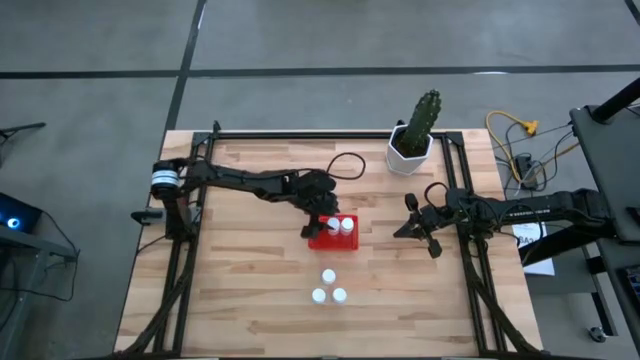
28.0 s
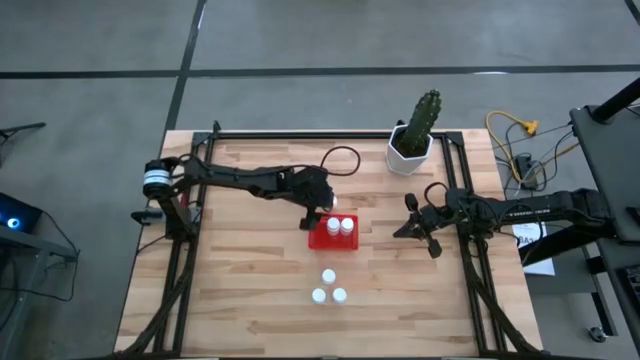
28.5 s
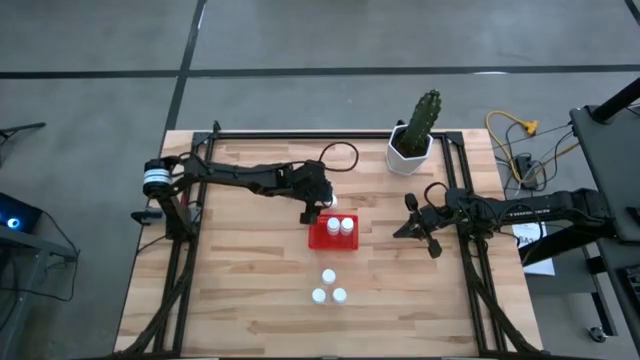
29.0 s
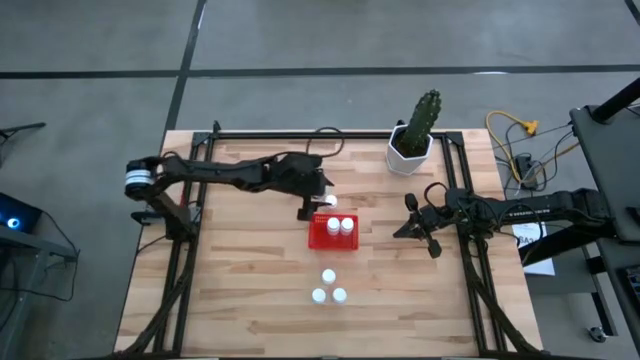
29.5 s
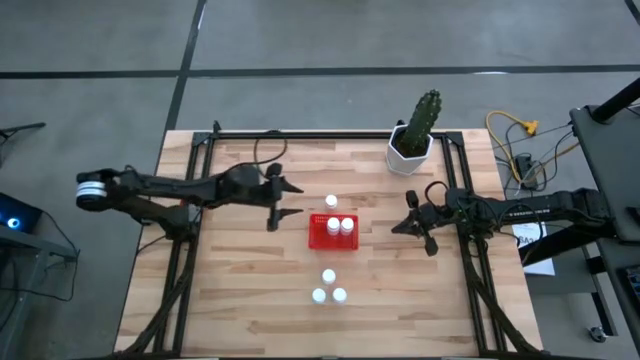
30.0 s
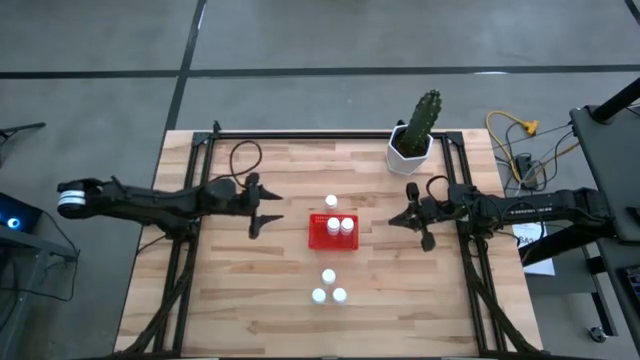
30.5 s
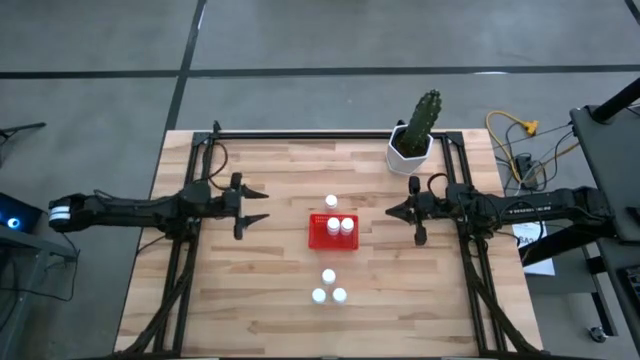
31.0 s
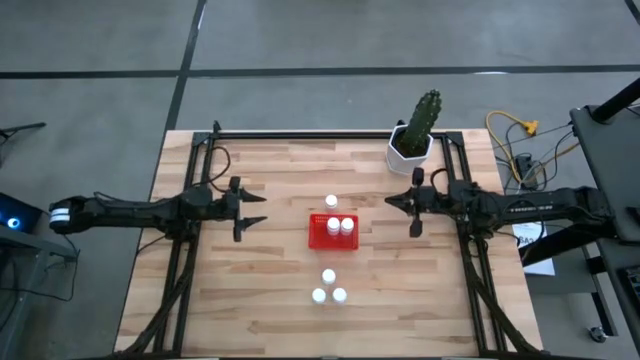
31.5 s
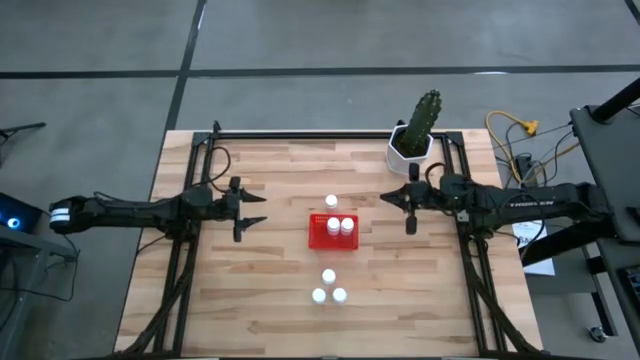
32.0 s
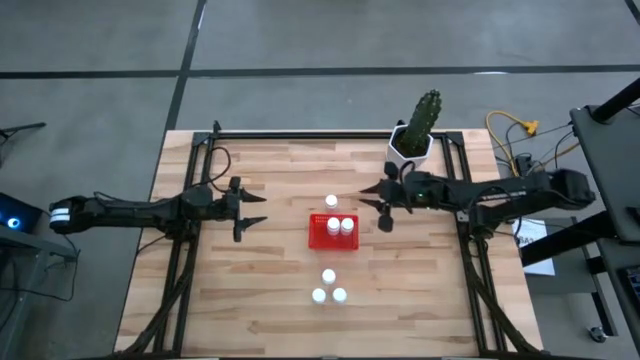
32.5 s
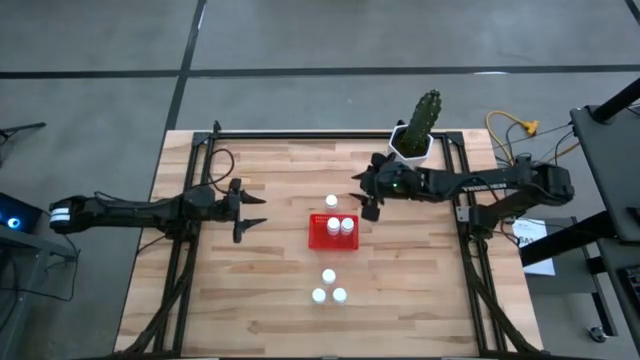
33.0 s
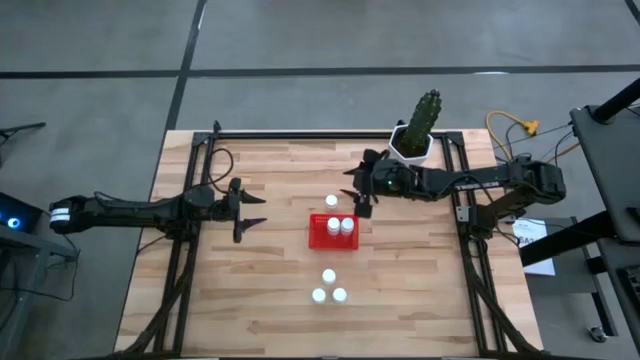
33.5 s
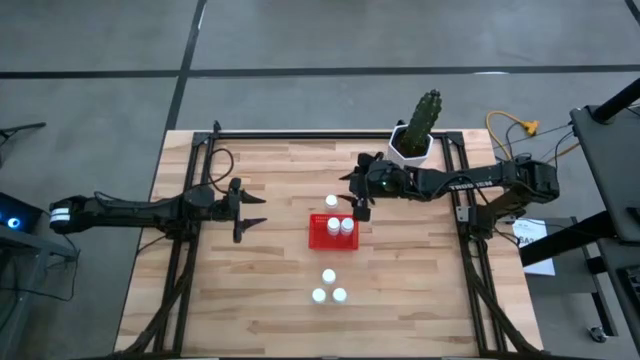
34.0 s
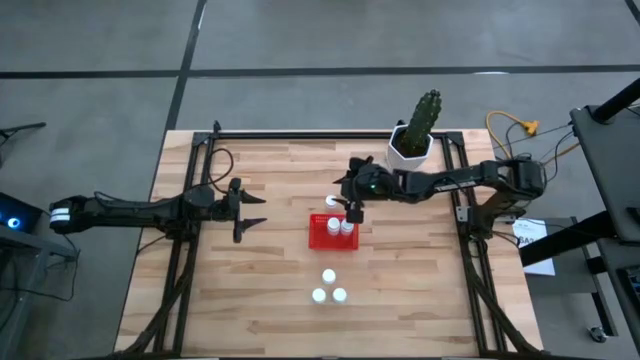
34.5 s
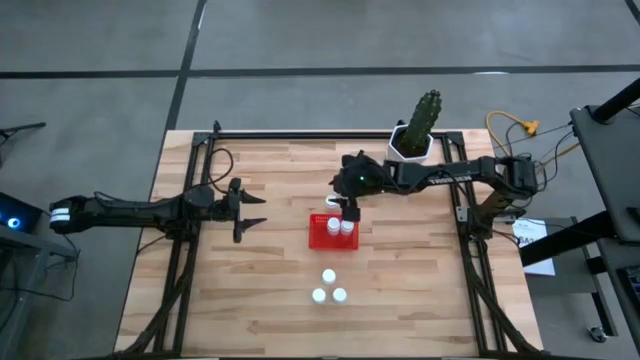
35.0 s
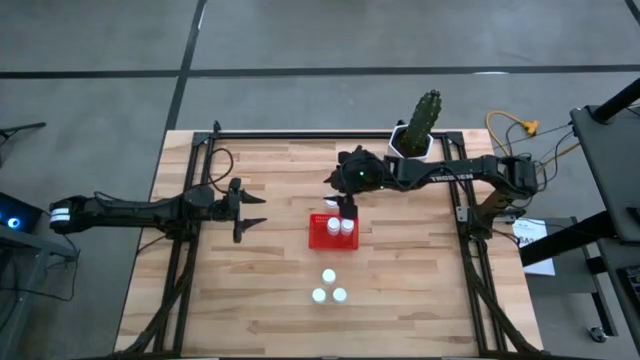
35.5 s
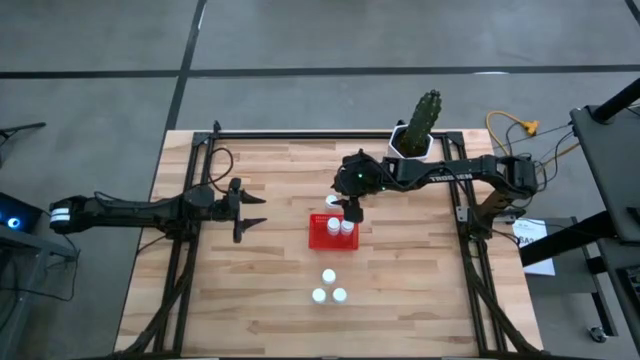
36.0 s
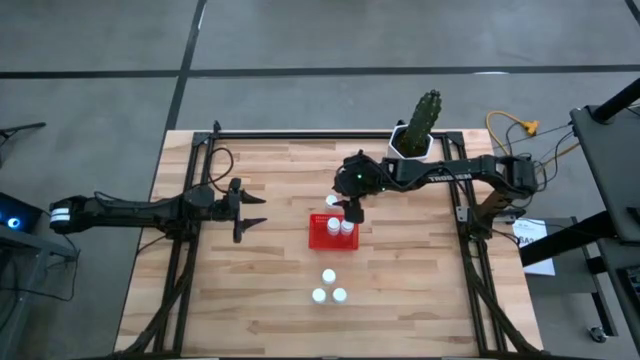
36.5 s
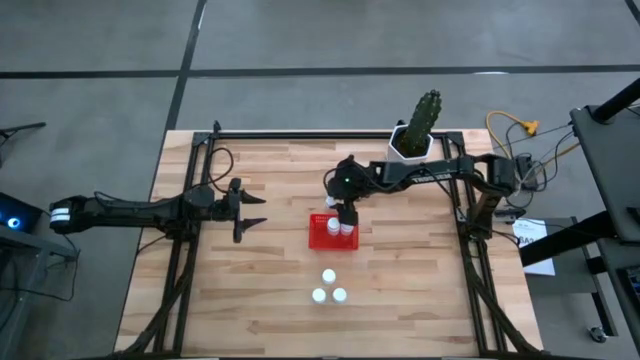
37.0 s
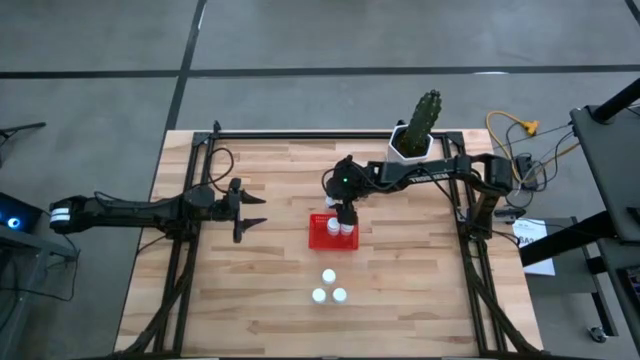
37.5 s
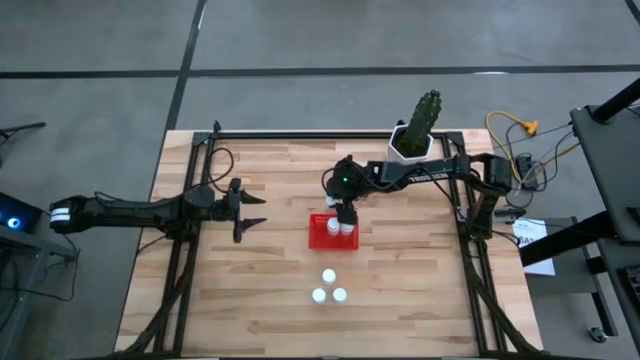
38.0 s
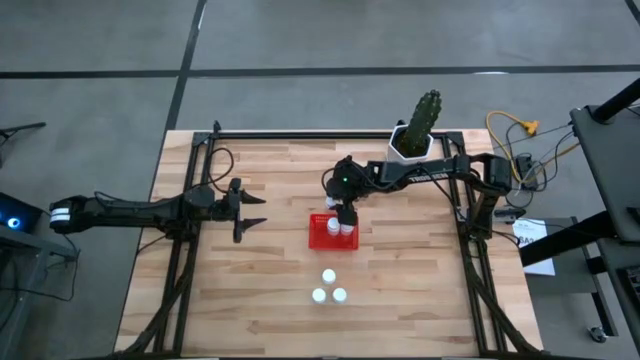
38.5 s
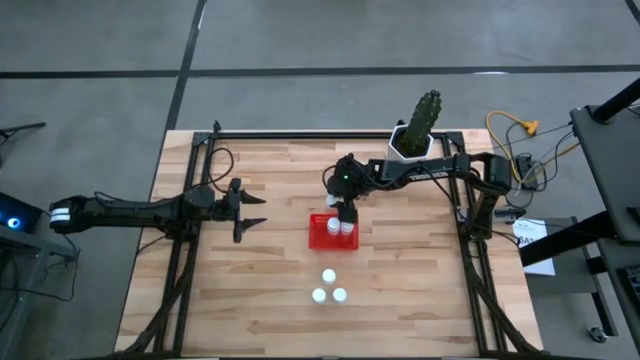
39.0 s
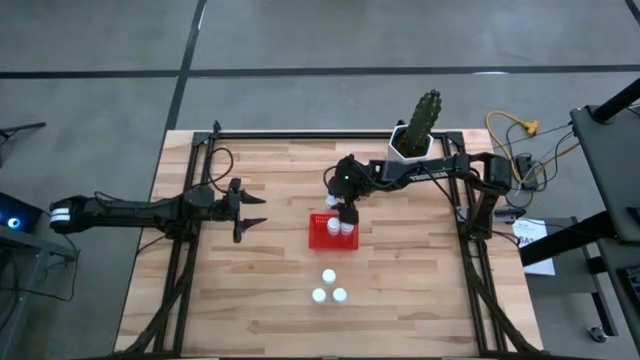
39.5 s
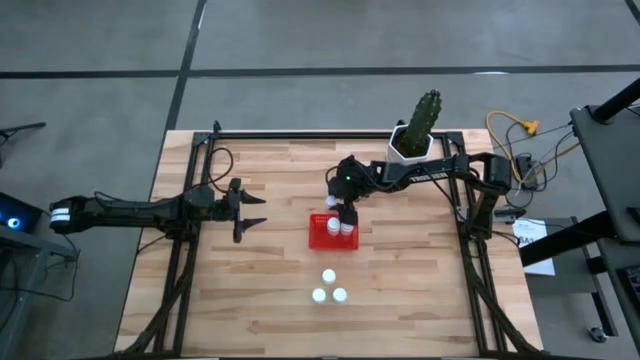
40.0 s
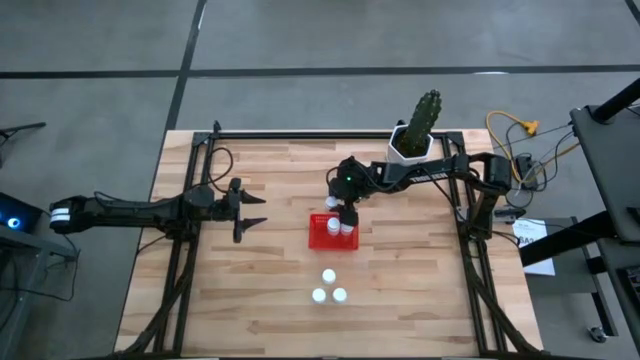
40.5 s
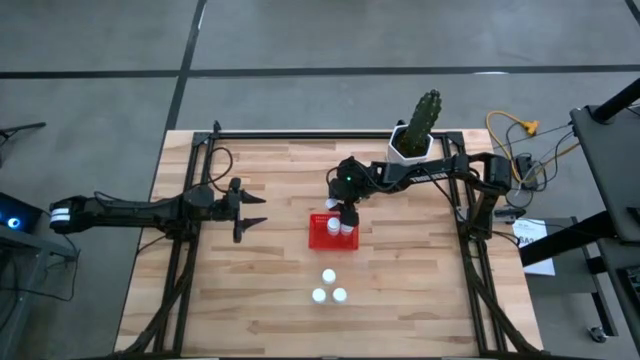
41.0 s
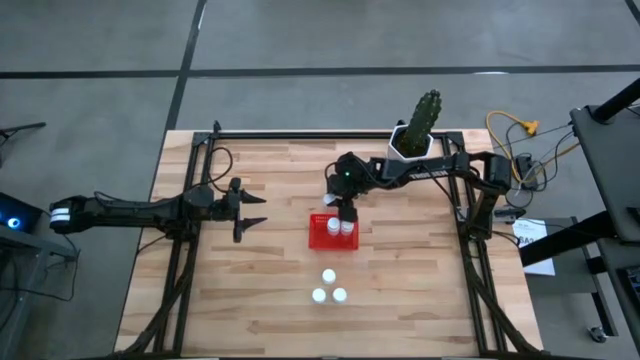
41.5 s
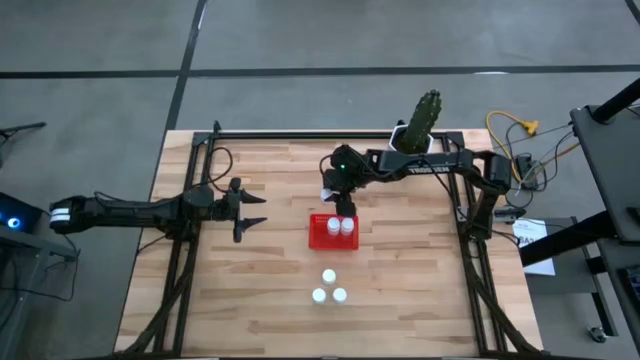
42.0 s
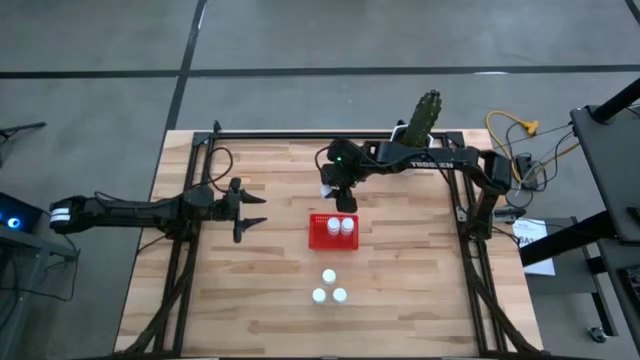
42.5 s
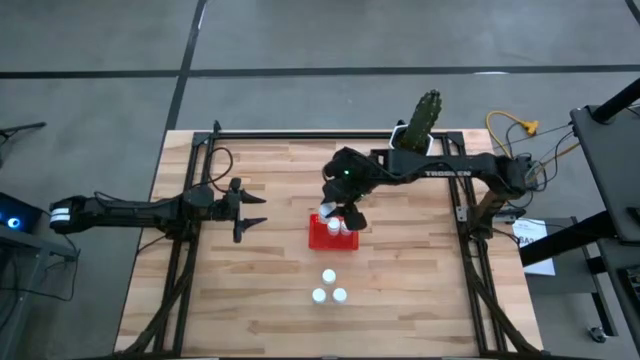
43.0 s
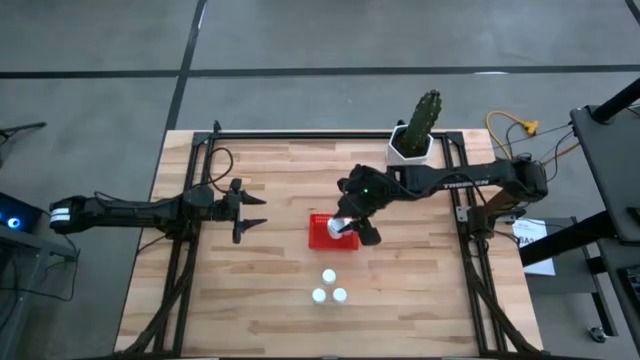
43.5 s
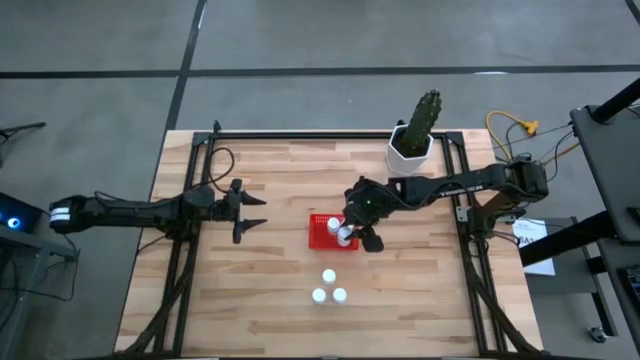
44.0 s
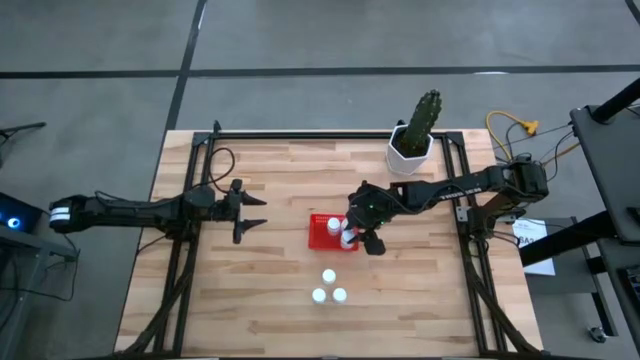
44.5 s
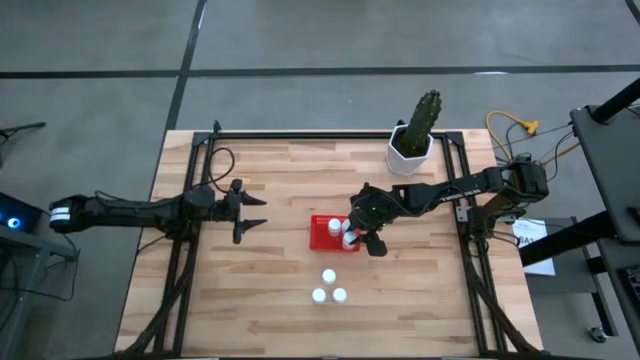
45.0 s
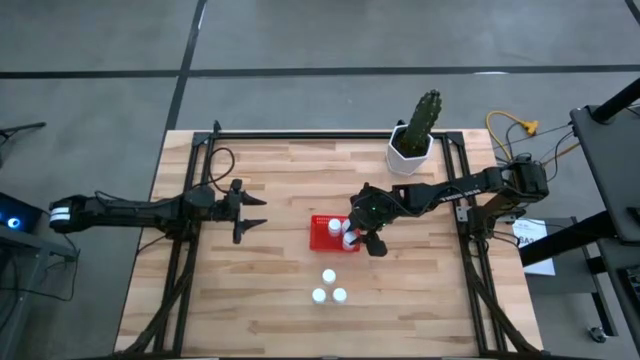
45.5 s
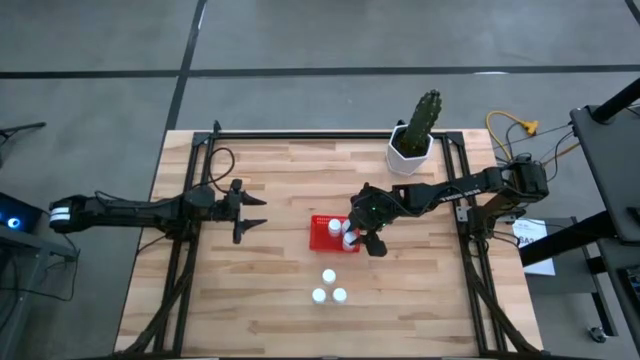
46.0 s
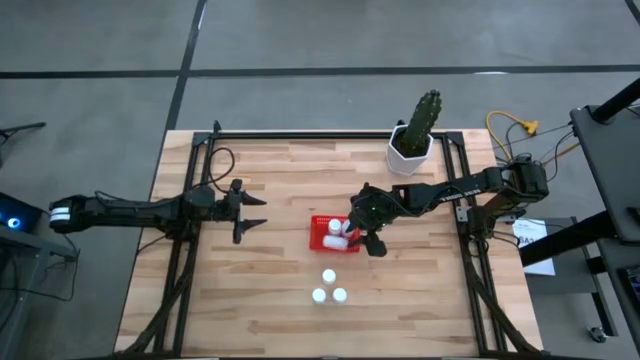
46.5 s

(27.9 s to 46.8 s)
Task: Pick and place pill bottles into a basket
Put the white pill bottle into the red basket
